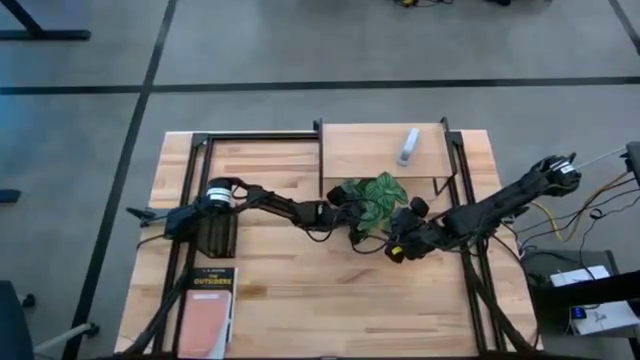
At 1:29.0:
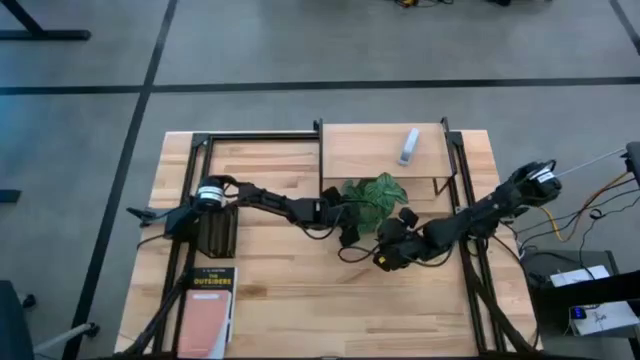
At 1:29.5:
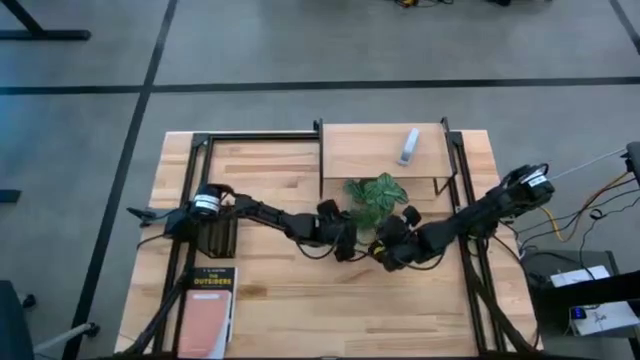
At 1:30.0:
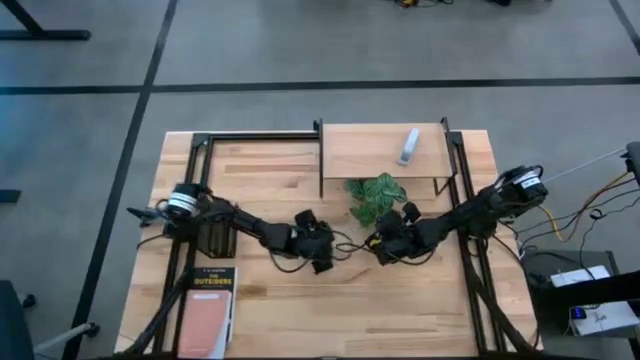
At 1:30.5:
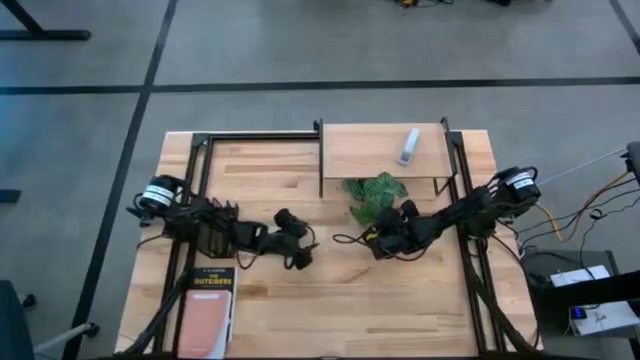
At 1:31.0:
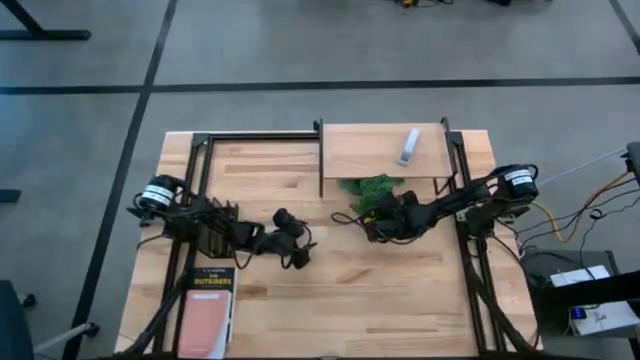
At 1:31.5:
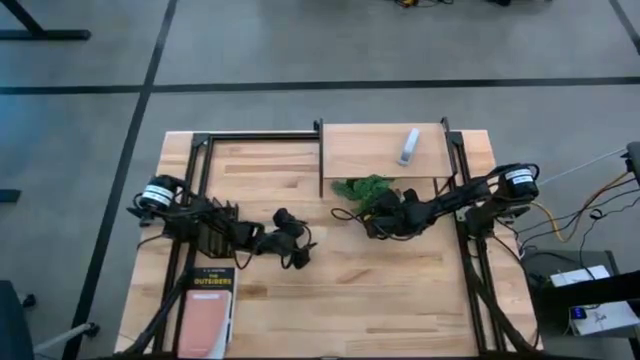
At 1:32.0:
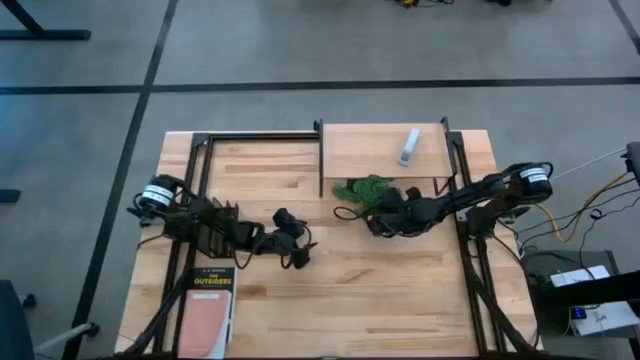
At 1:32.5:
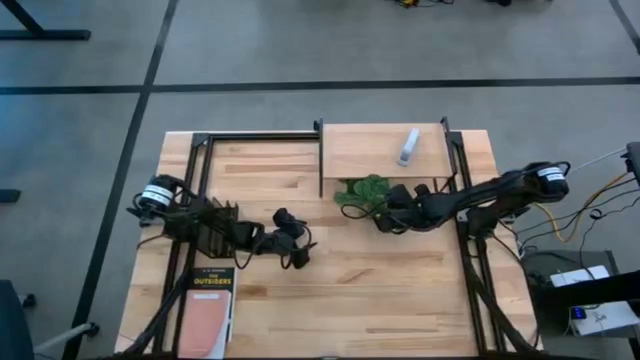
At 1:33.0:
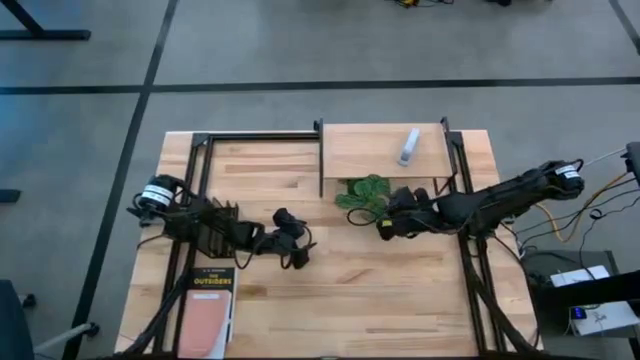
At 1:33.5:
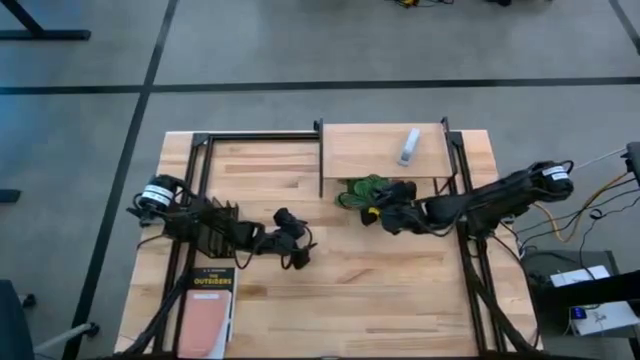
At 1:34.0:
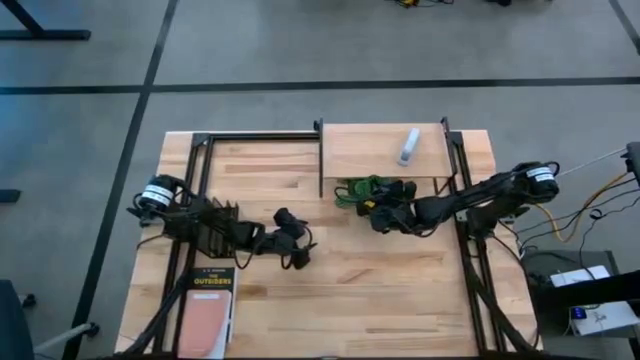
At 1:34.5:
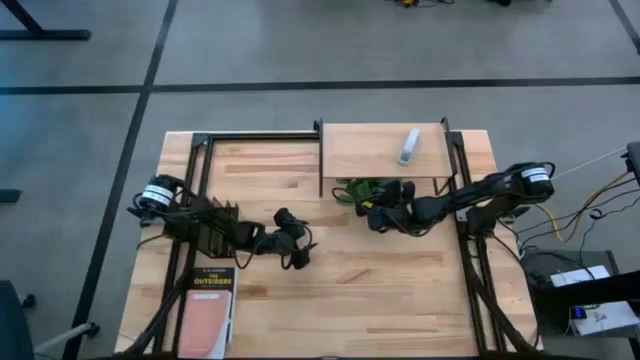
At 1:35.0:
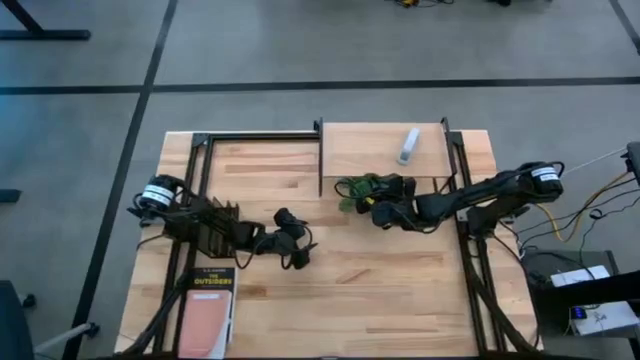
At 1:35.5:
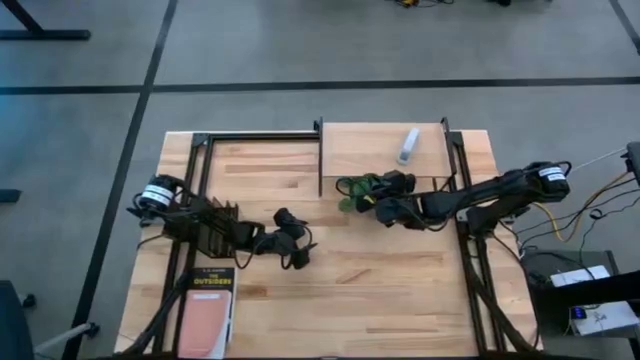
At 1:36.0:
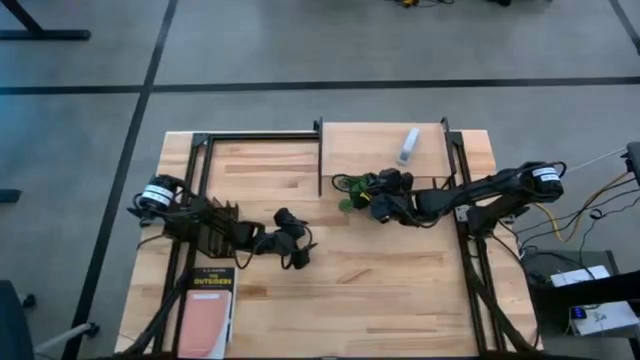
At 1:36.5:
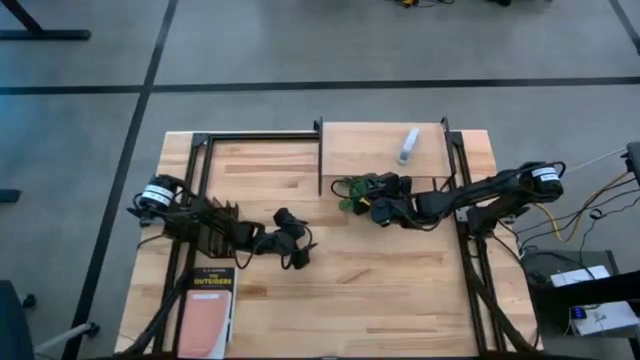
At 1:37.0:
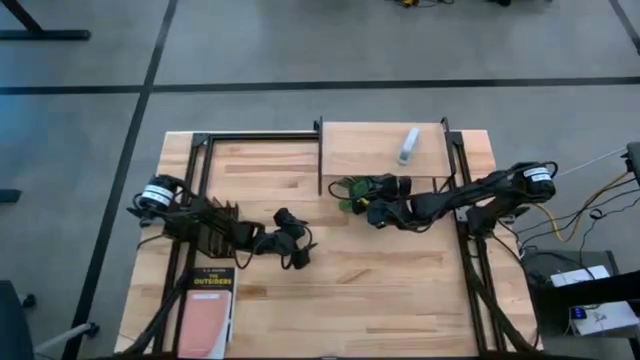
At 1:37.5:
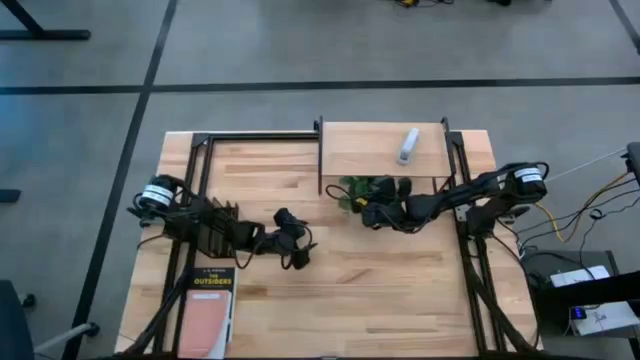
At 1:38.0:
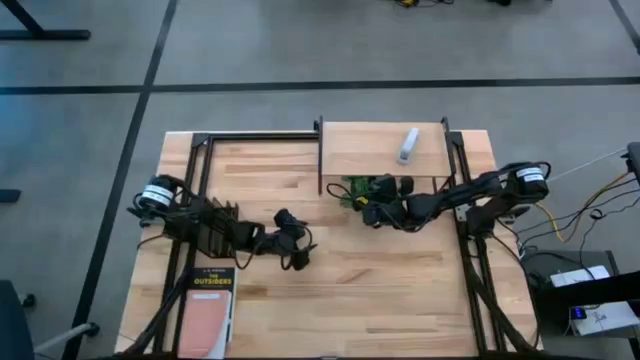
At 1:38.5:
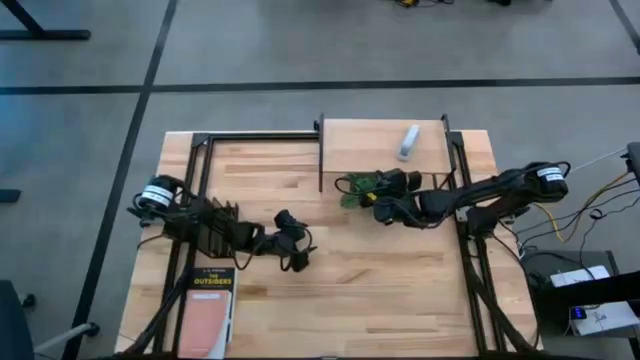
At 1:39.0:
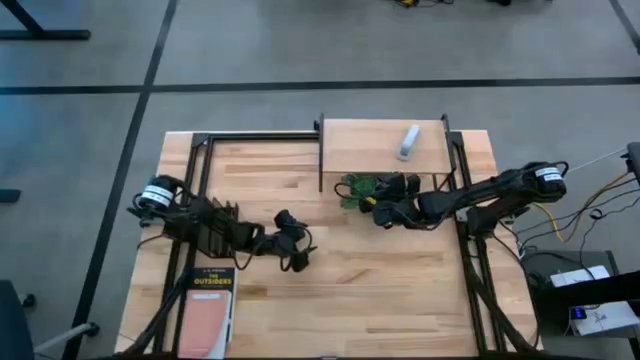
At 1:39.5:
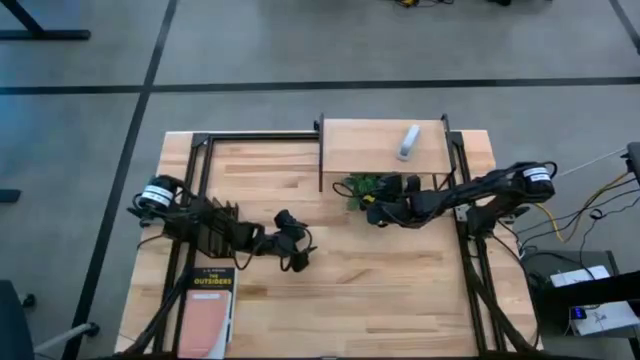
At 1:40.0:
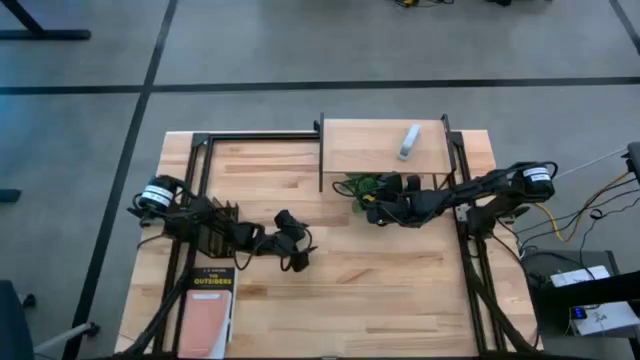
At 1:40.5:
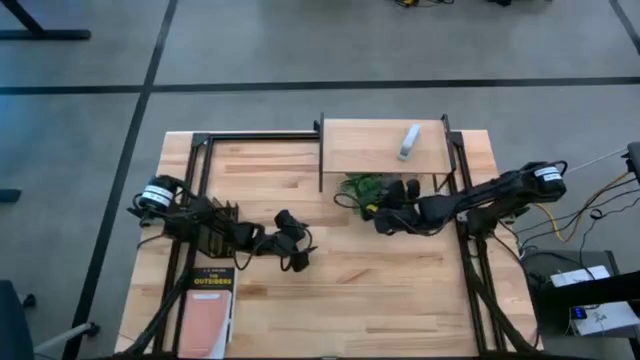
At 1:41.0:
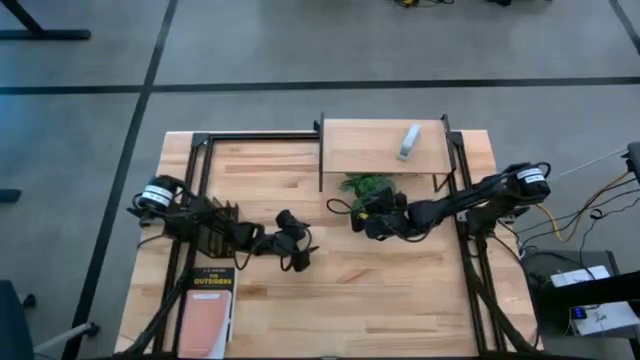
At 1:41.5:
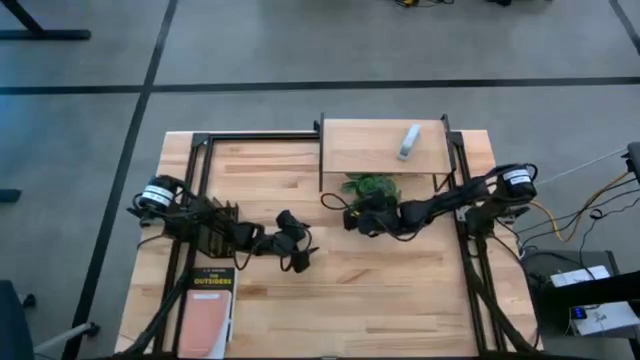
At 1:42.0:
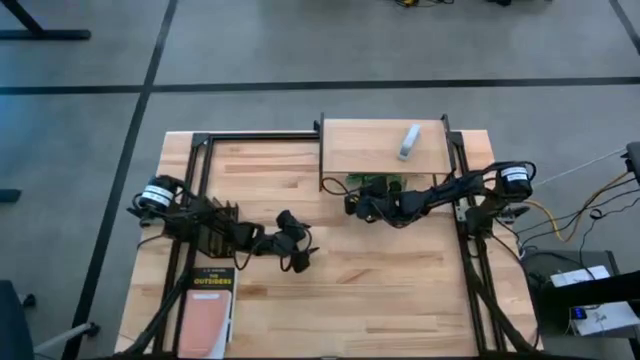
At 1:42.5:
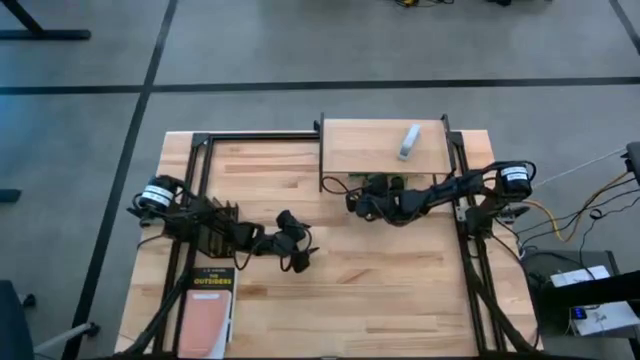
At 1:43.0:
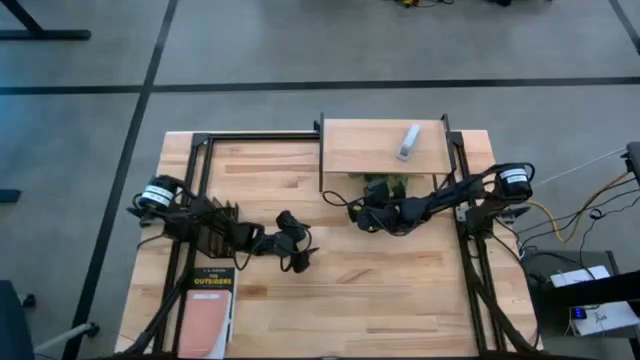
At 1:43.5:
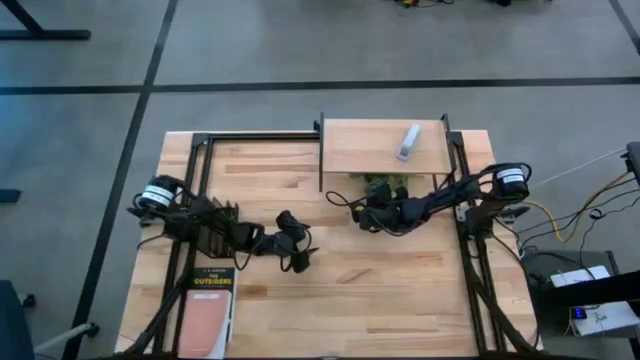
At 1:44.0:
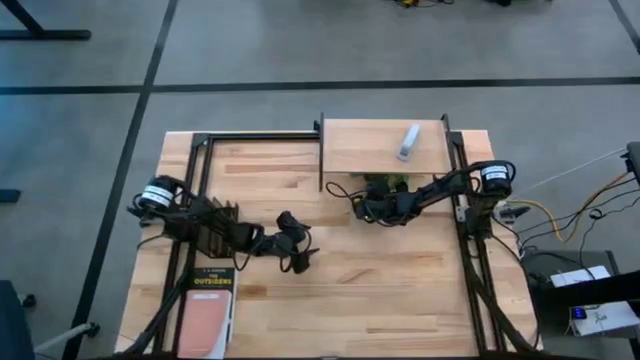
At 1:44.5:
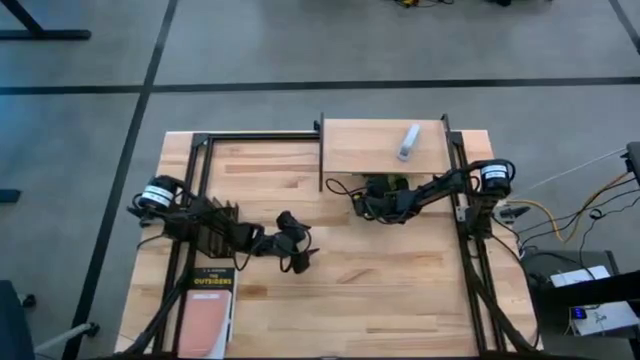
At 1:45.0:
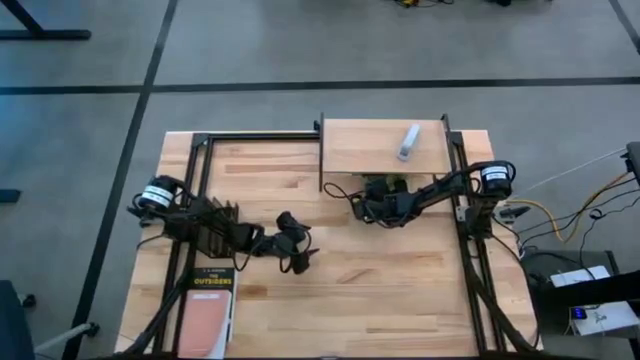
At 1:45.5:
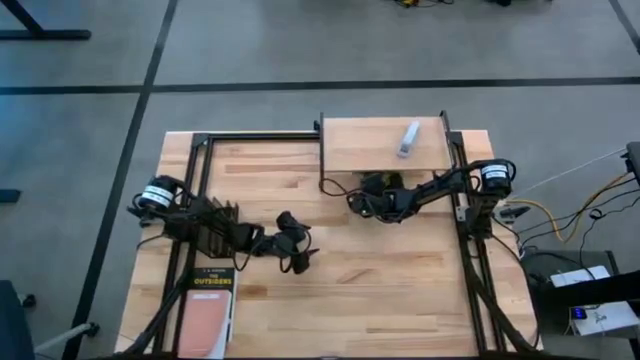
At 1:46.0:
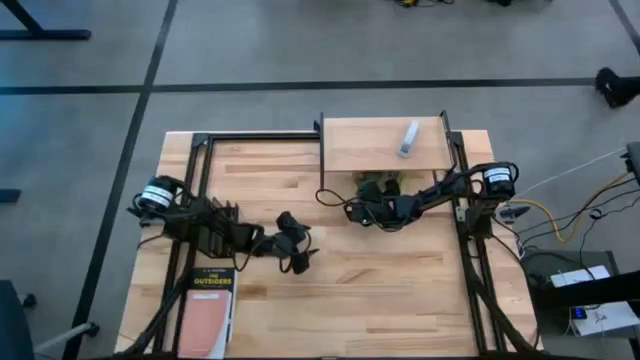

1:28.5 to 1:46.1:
Task: Stock shelves
Put the white vase plant under the shelf

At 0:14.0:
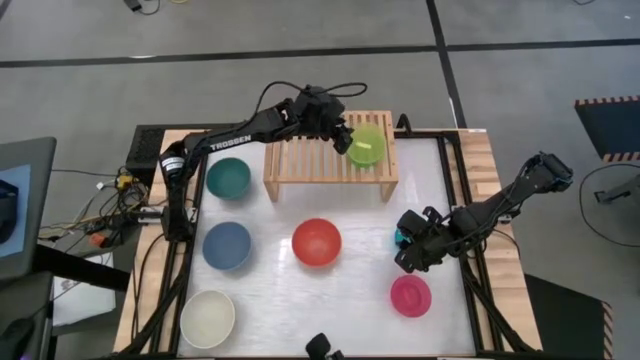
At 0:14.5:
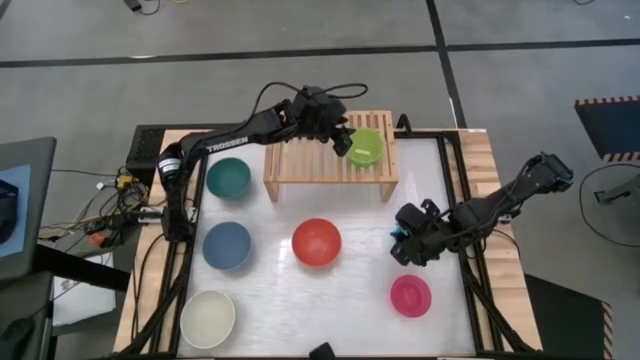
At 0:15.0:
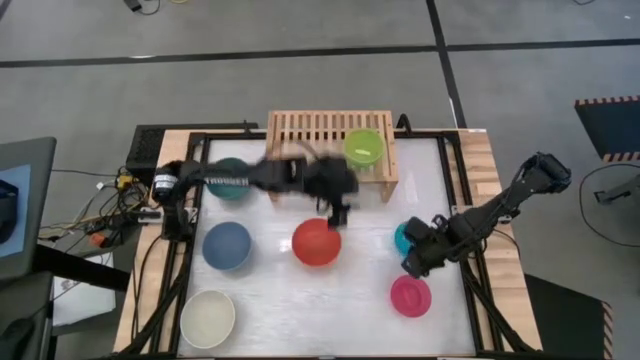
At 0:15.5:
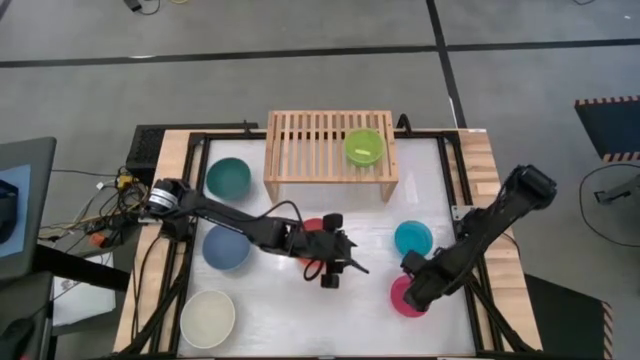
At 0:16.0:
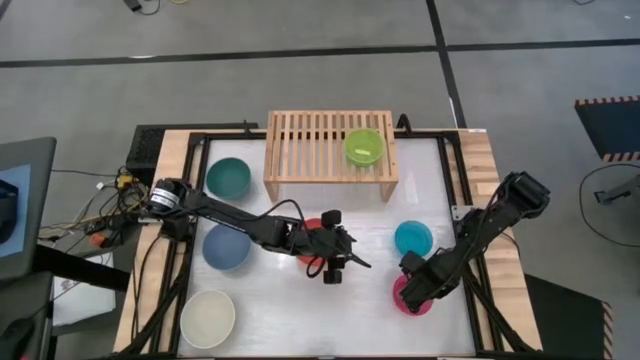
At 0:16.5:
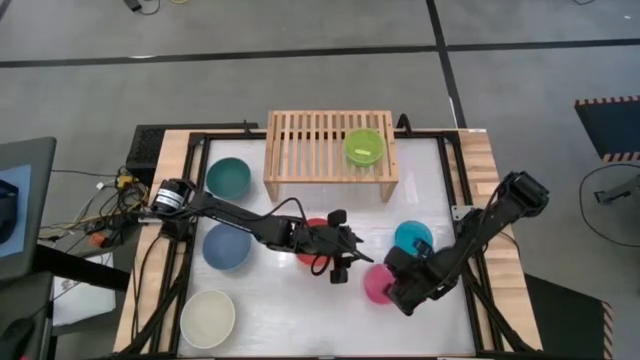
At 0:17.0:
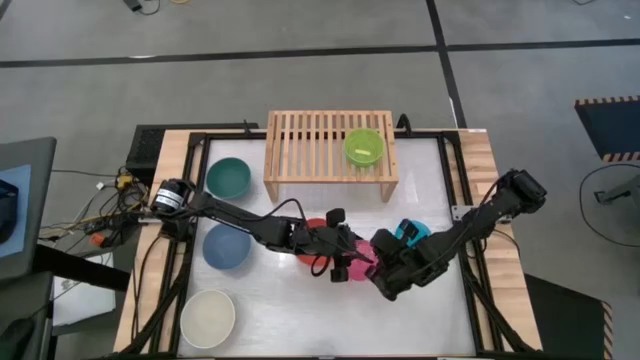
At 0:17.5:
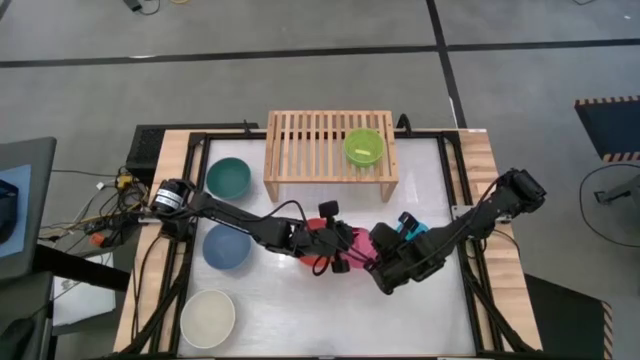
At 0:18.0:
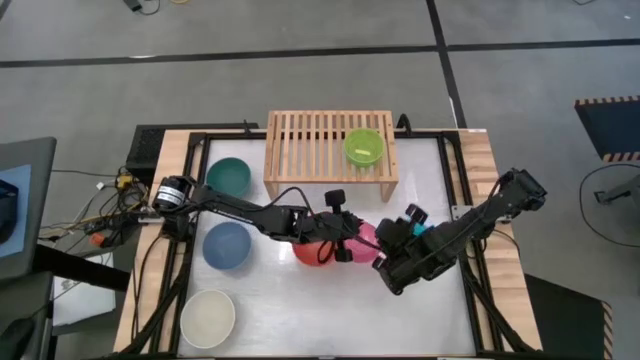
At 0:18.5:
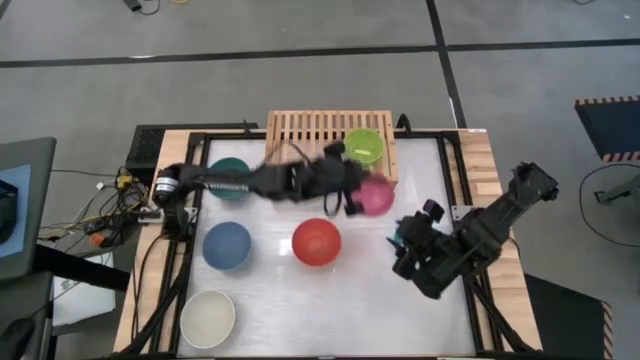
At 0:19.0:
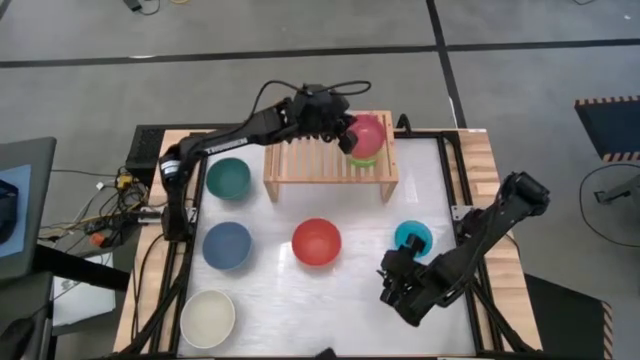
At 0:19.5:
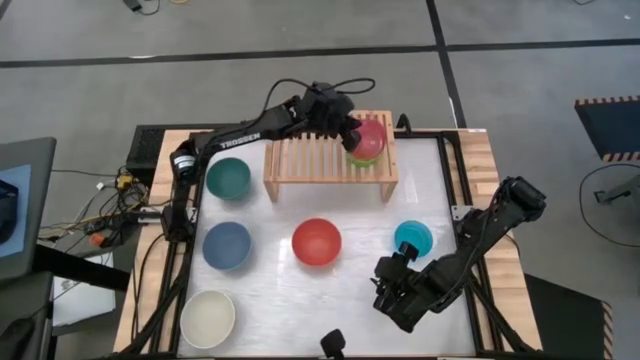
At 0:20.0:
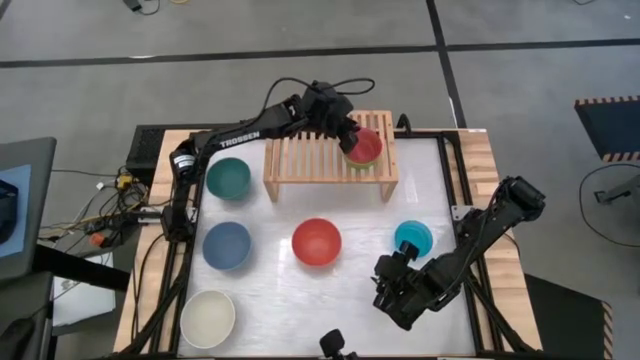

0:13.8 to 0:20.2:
Task: Place and stack bowls onto a shelf
Stack the pink bowl on top of the yellow bowl on the shelf
